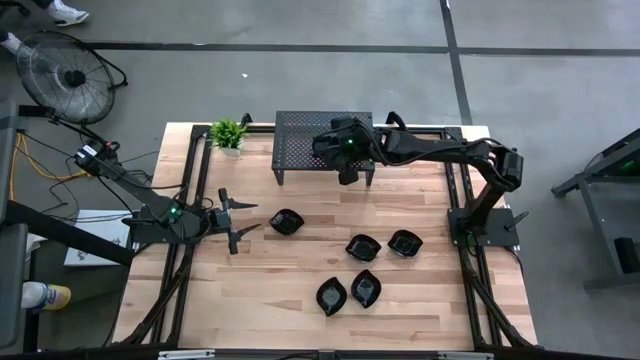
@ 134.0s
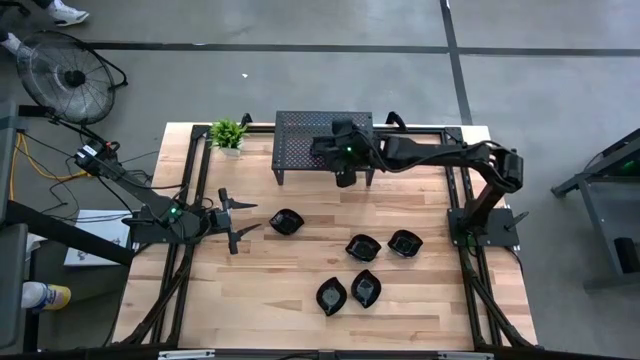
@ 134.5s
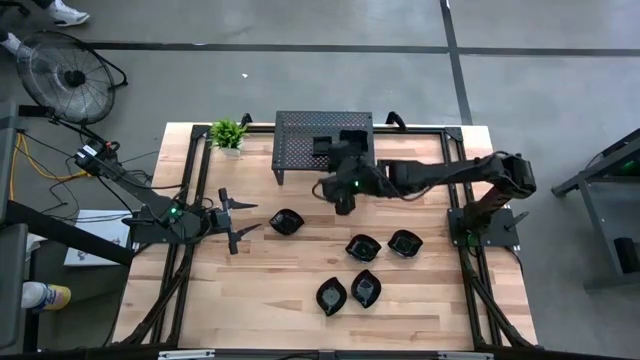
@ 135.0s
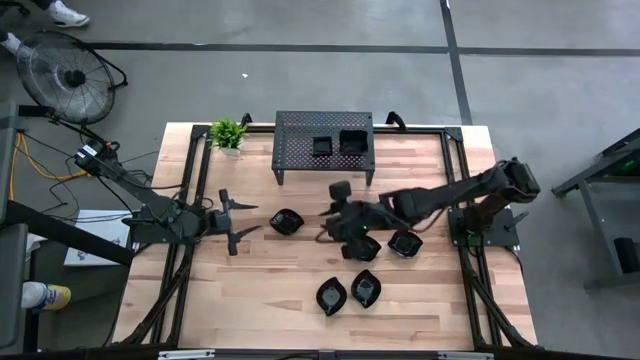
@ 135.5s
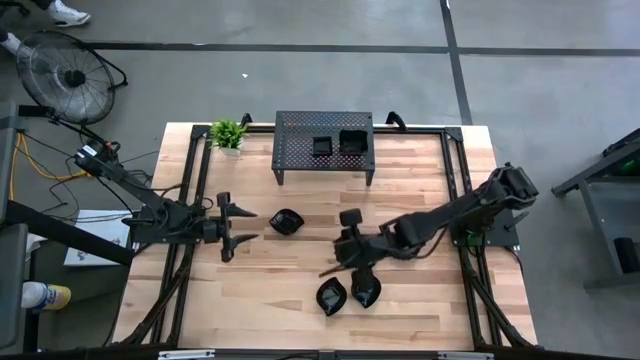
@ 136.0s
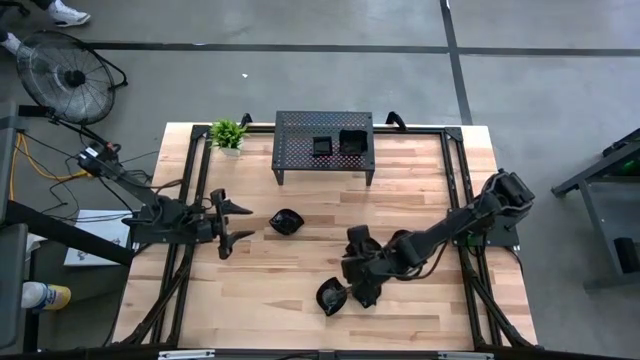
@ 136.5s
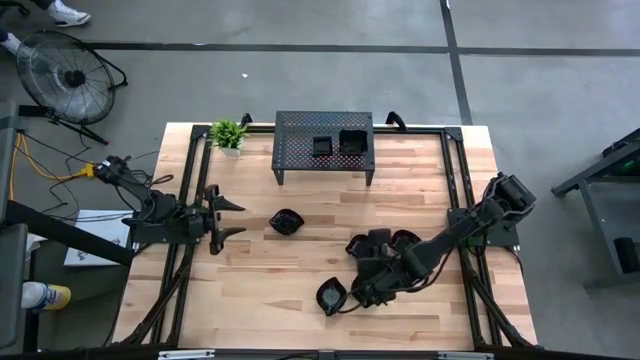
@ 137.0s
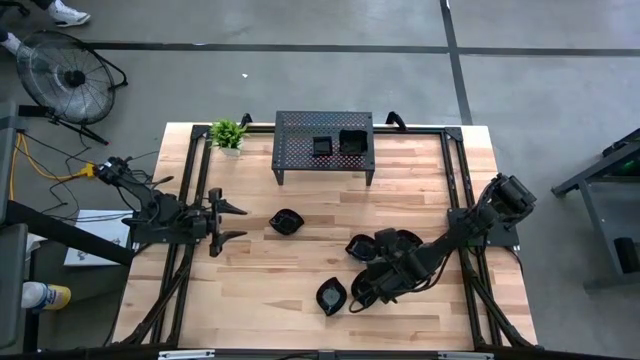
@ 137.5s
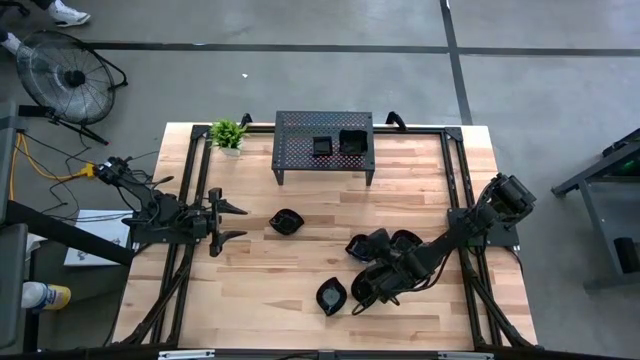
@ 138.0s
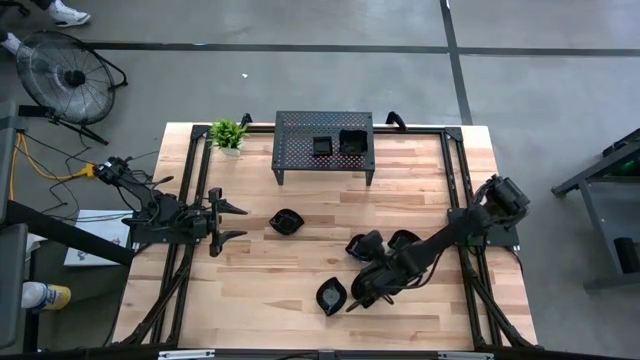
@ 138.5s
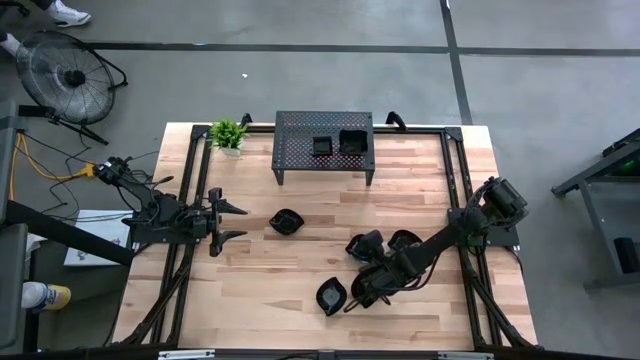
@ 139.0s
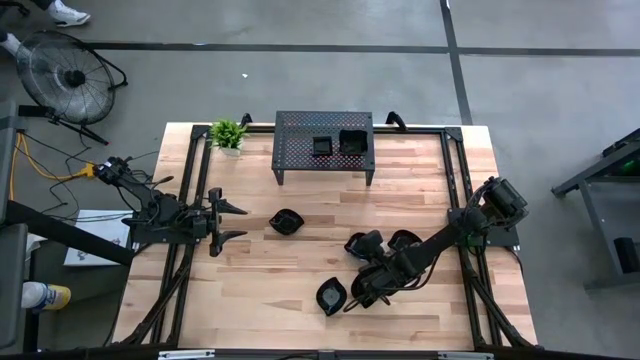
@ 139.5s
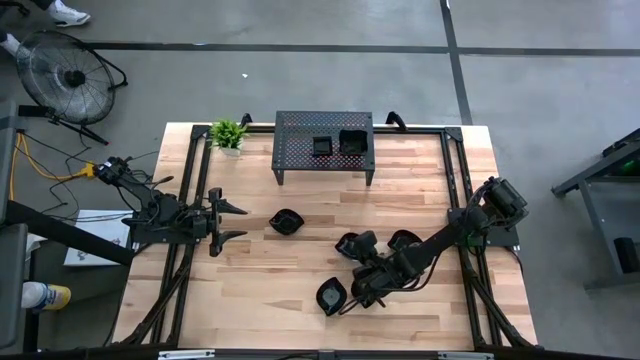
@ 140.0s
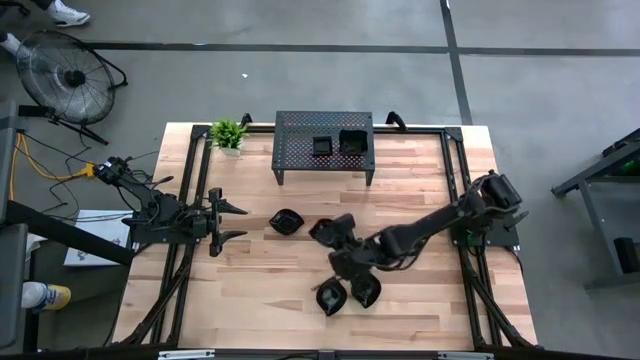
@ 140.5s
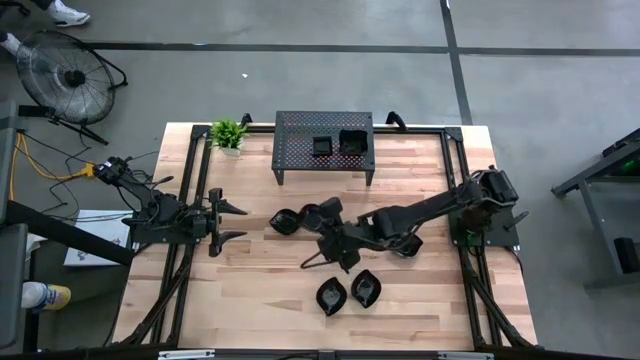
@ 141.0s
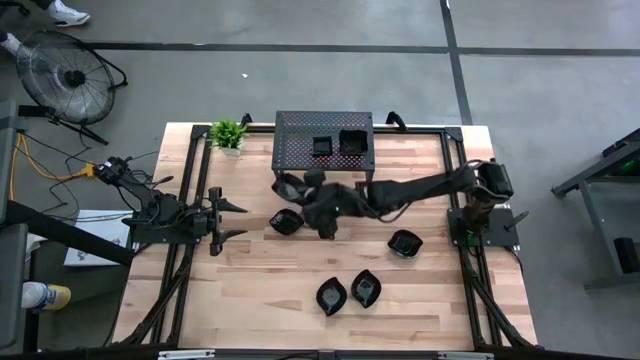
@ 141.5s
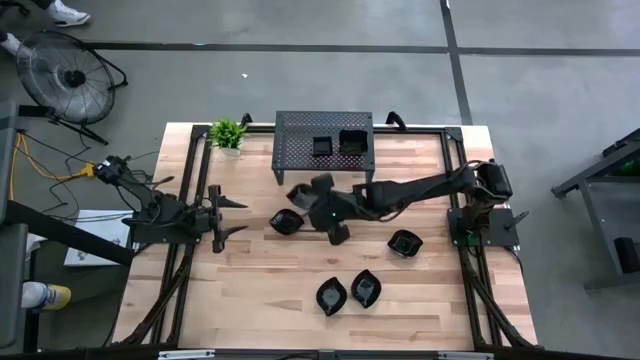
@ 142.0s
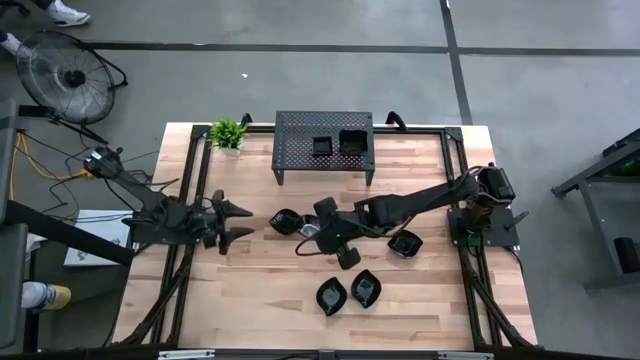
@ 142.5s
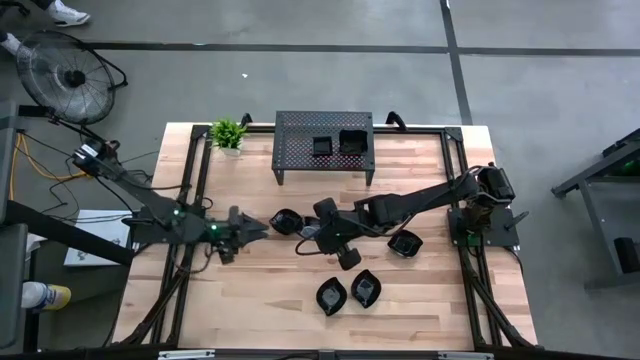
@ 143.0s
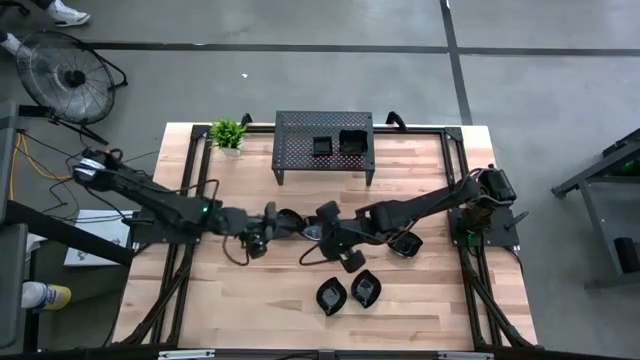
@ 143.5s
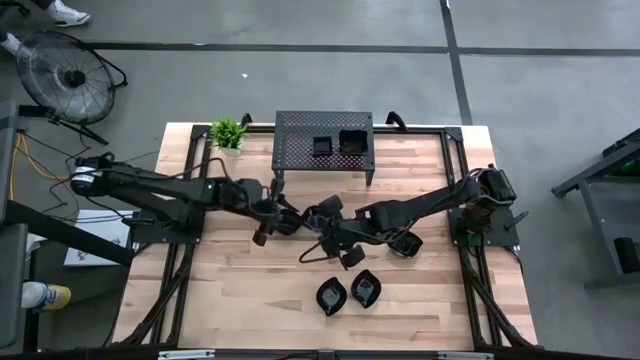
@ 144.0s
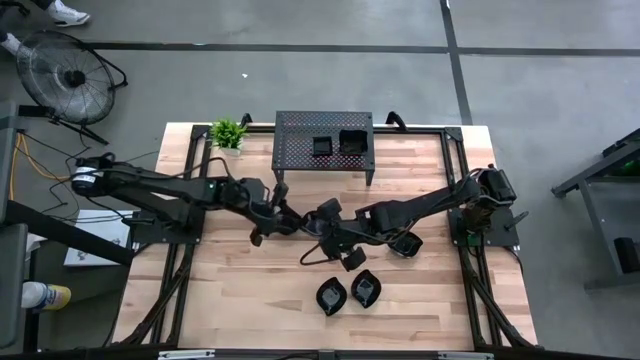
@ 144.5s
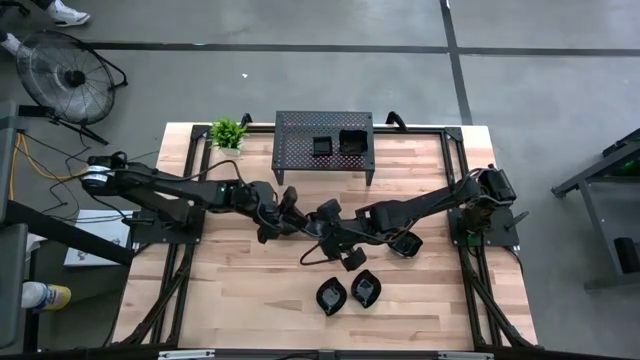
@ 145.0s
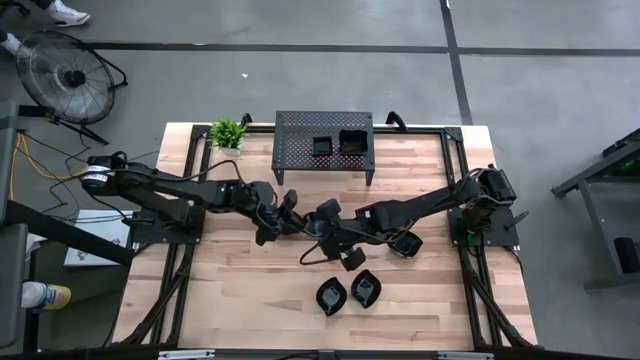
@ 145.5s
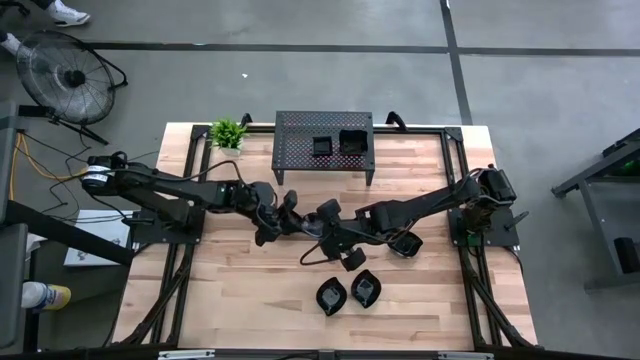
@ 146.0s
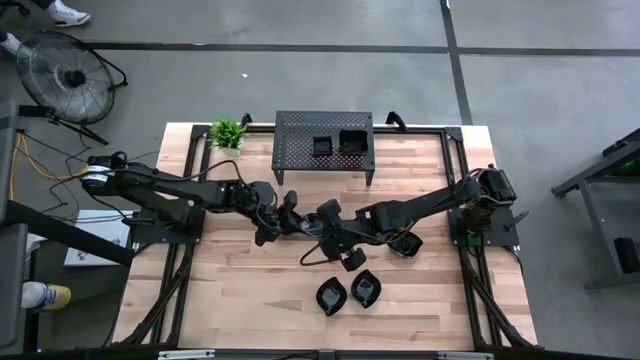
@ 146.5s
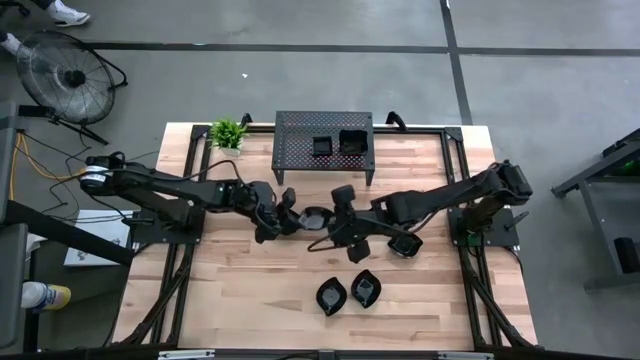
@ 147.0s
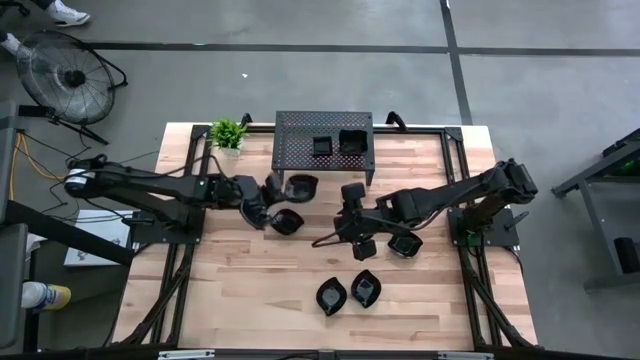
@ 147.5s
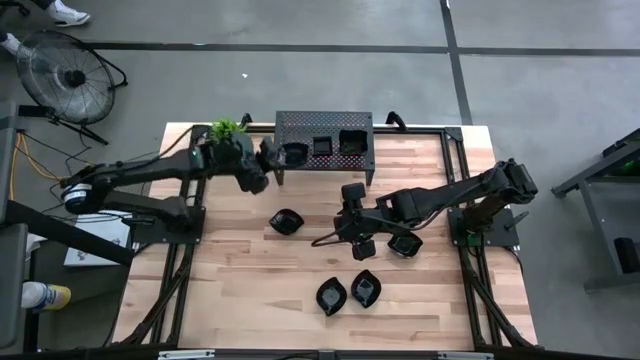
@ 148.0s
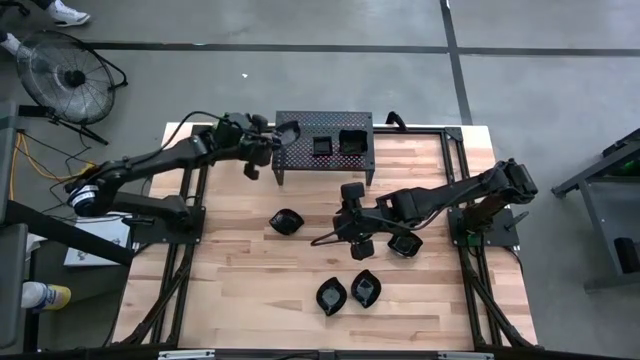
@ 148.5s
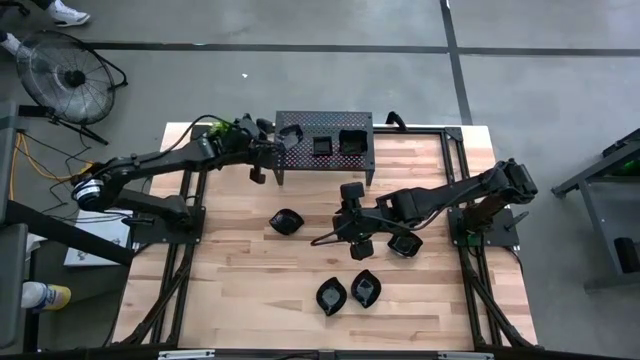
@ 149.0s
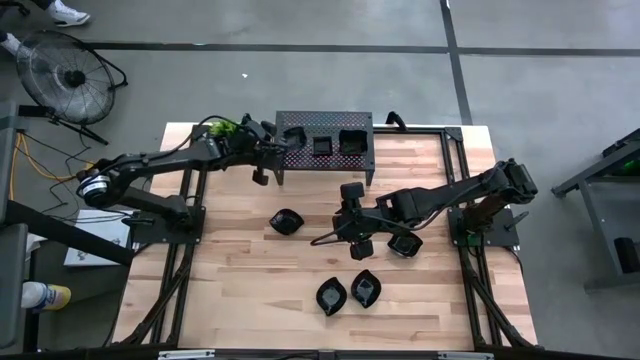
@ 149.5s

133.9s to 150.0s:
Task: Pick & Place Mini shaped plates
Put the leaf-shaped plate on the shelf

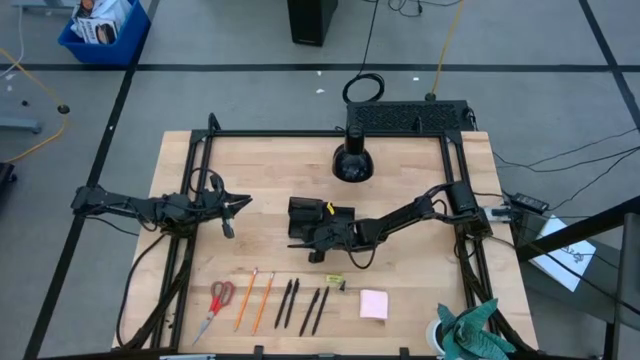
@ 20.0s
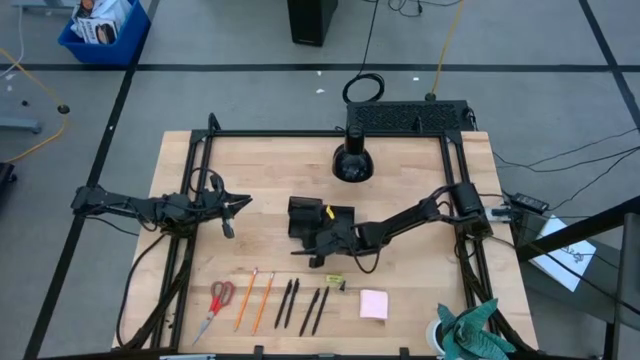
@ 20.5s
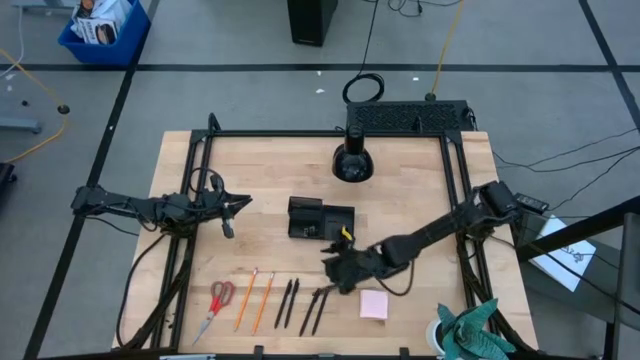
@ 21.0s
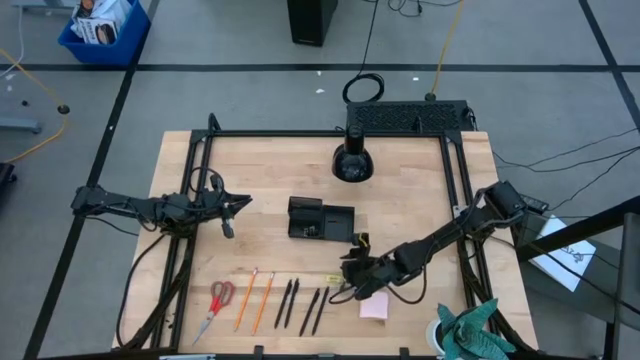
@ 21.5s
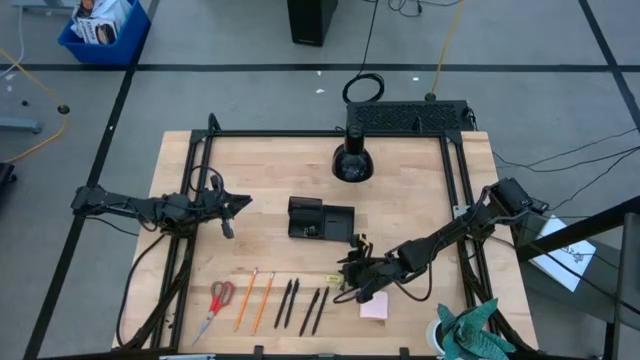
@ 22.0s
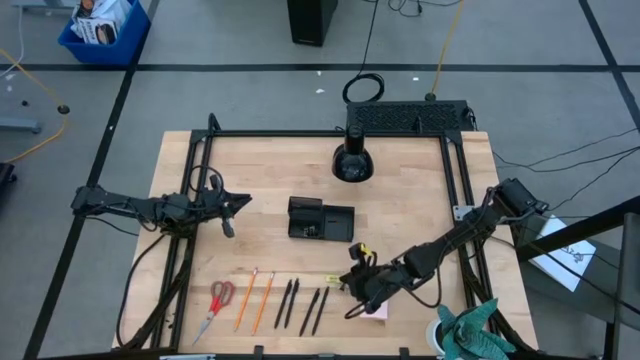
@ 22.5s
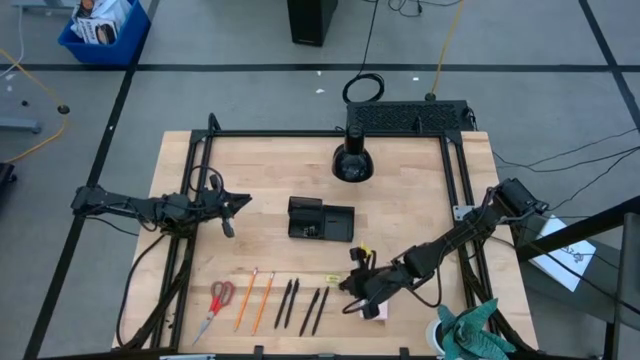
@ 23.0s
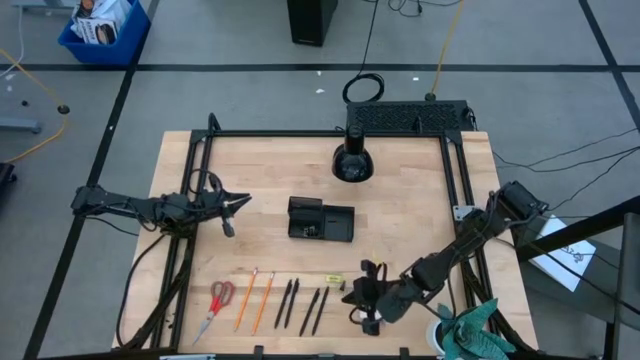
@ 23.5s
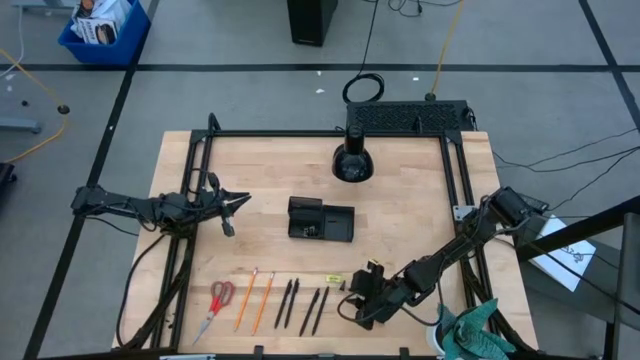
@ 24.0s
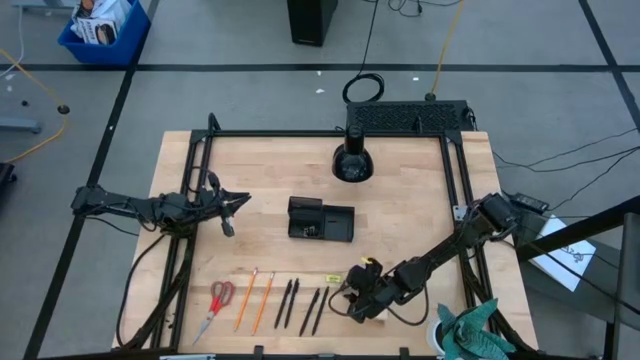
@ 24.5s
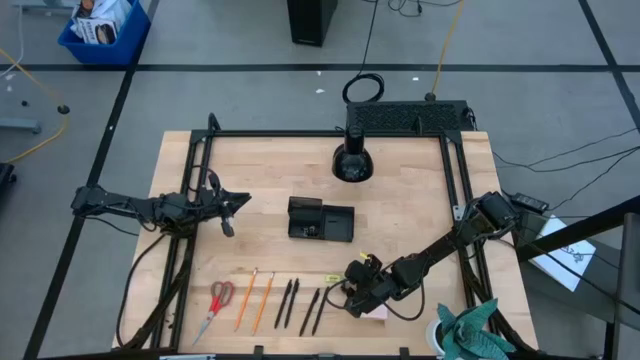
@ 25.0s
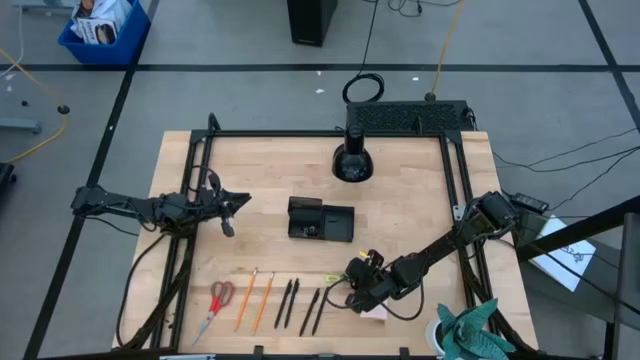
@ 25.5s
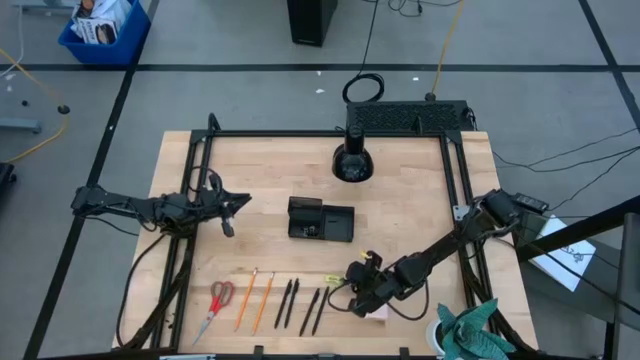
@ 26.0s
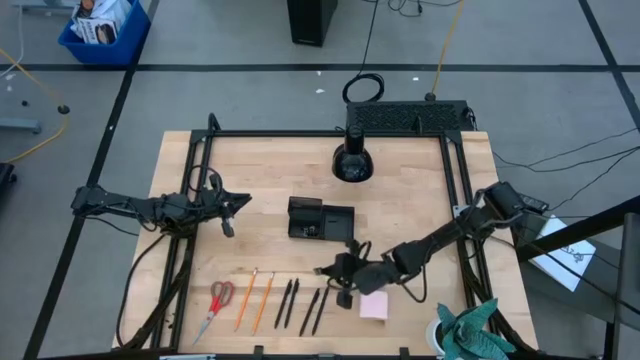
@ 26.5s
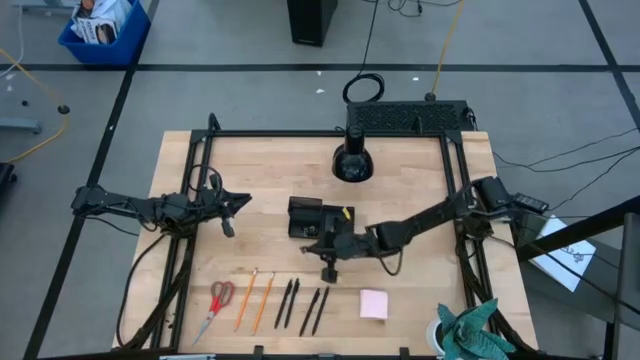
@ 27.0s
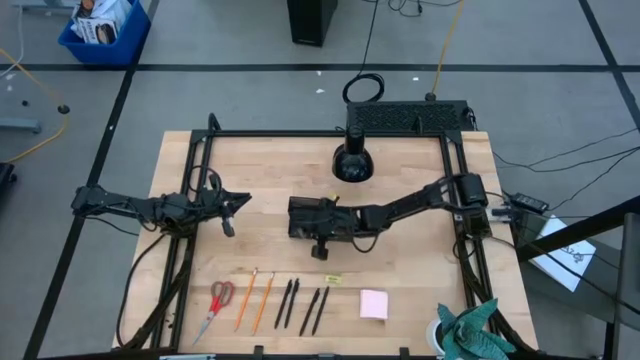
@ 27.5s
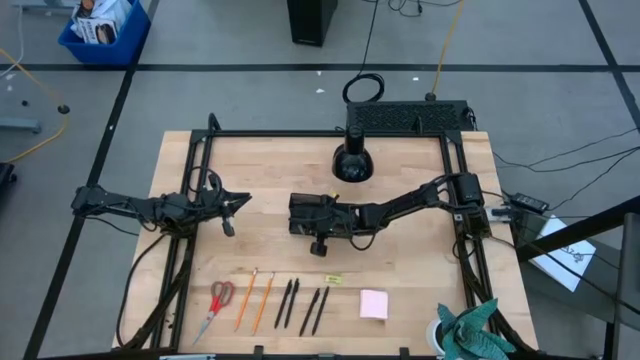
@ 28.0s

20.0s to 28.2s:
Task: Pick and place office supplies into organizer
Put the binder clip into the desk organizer
